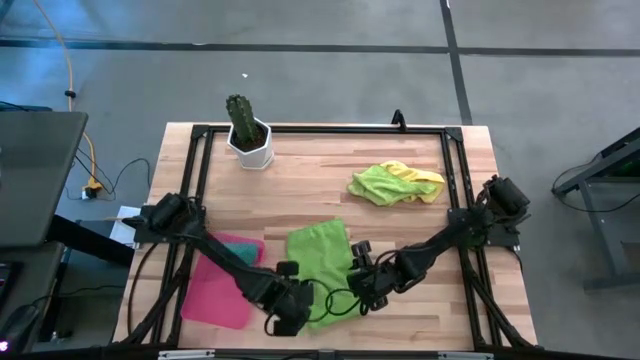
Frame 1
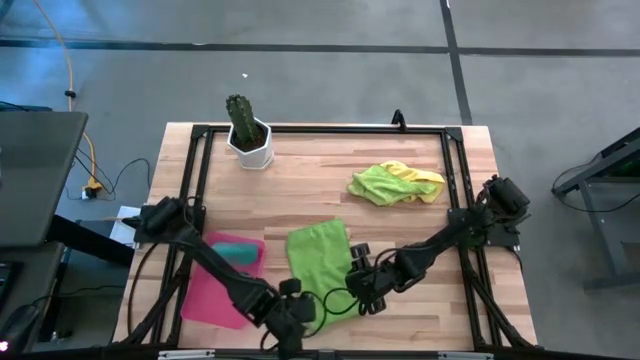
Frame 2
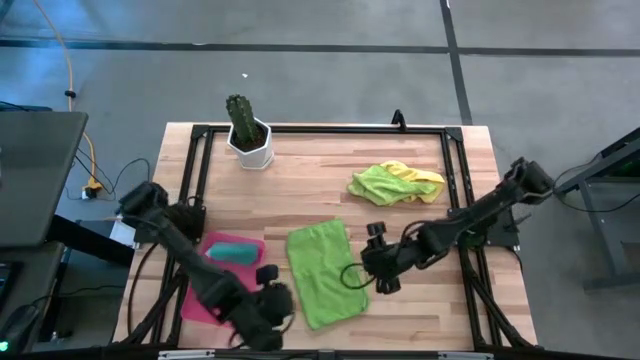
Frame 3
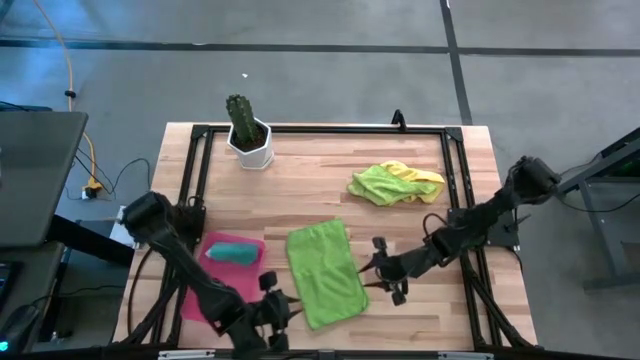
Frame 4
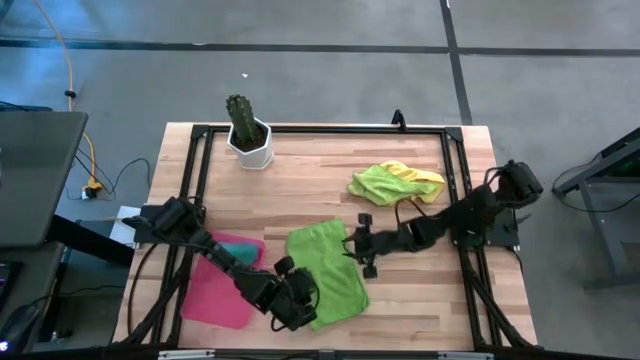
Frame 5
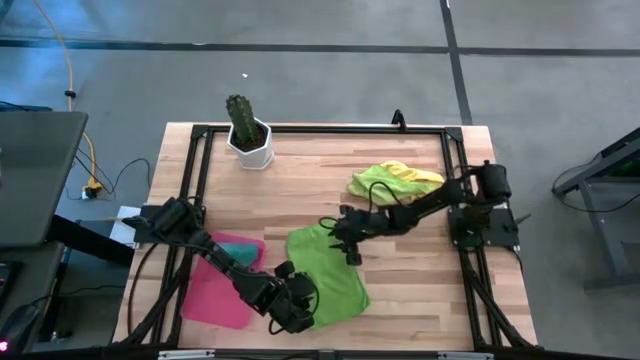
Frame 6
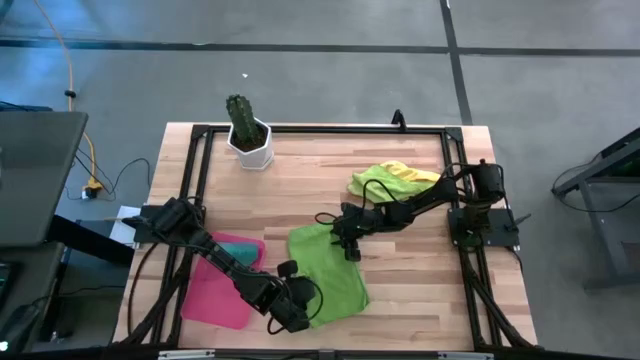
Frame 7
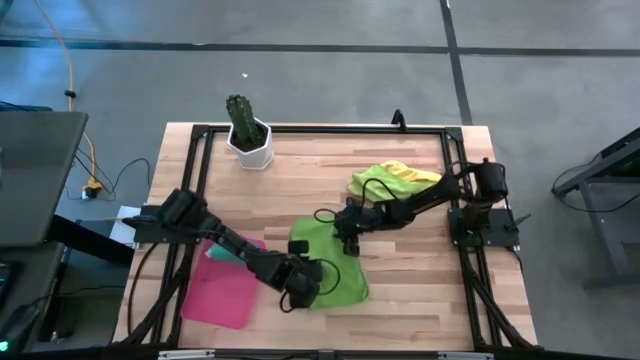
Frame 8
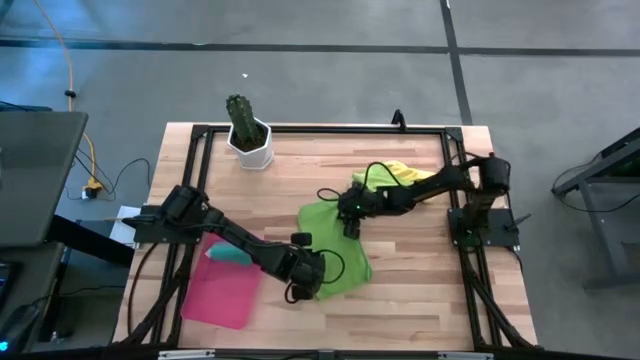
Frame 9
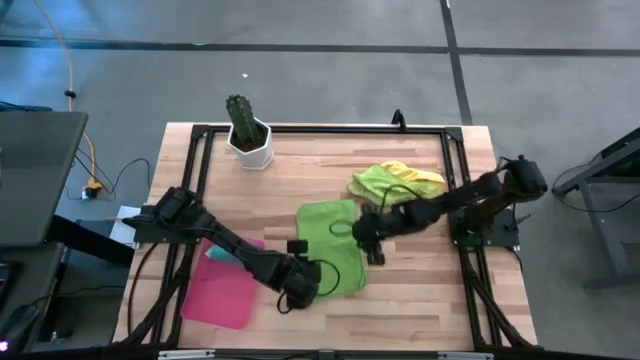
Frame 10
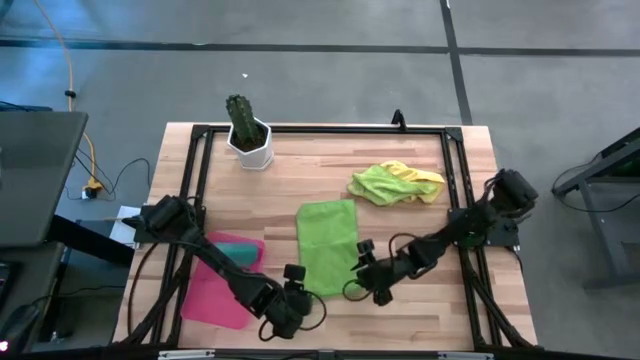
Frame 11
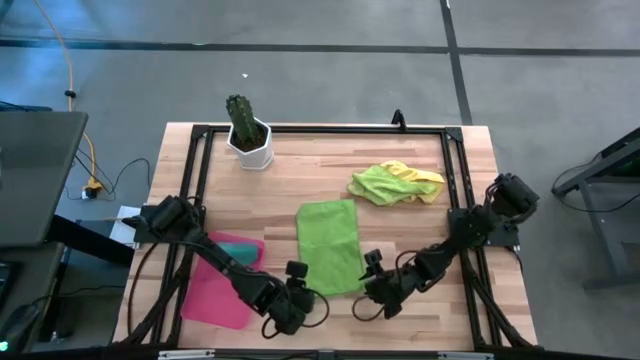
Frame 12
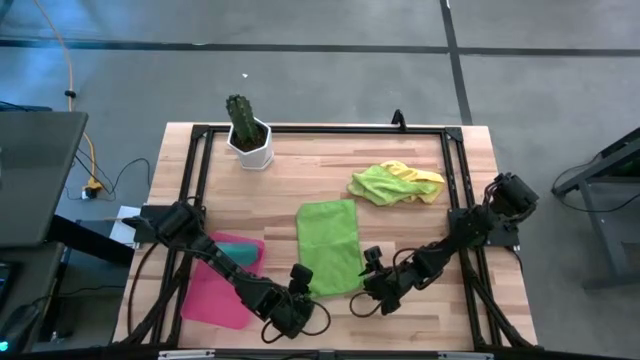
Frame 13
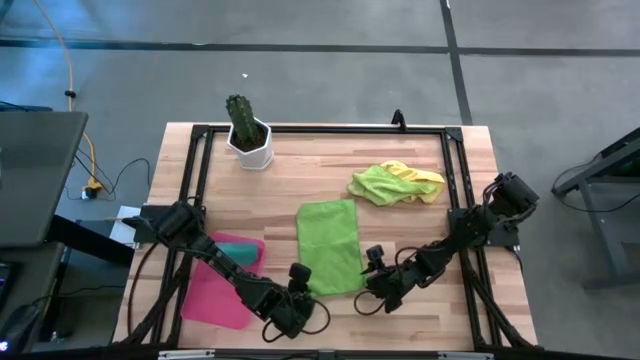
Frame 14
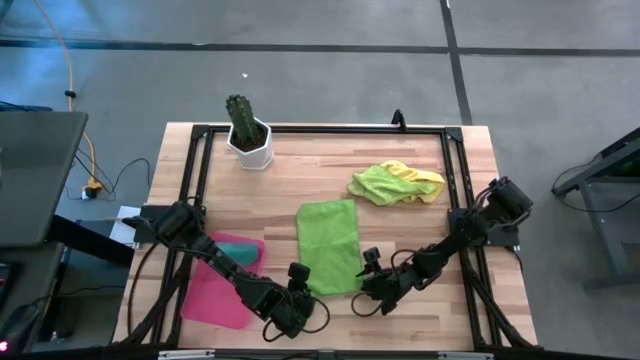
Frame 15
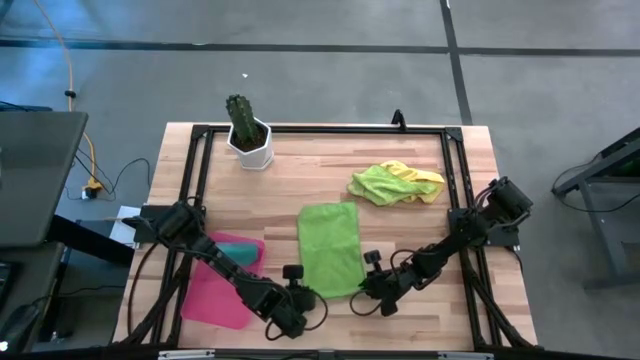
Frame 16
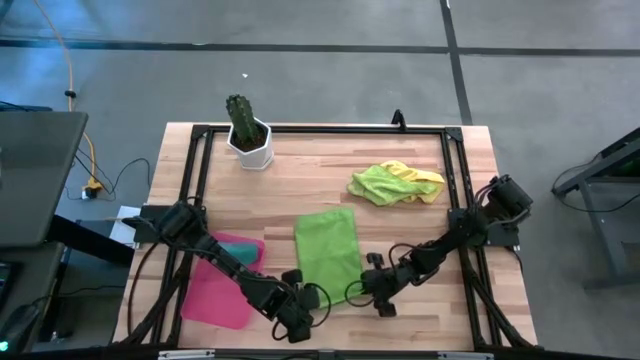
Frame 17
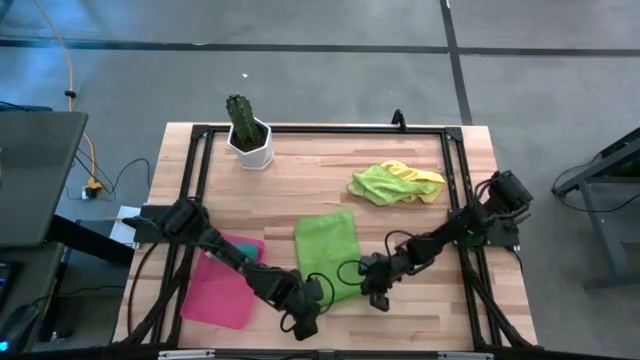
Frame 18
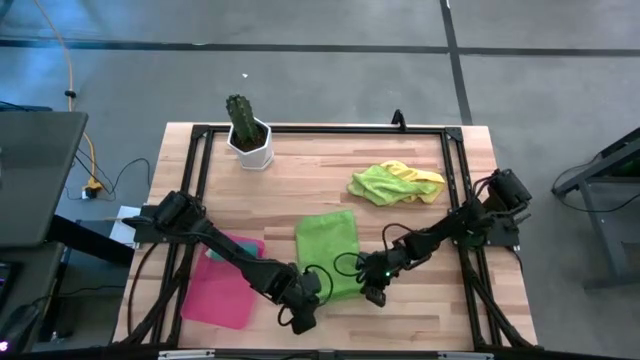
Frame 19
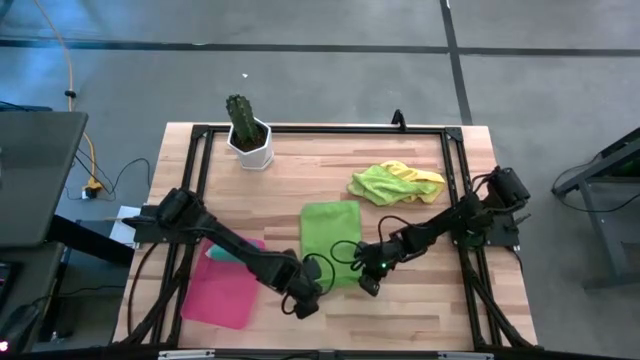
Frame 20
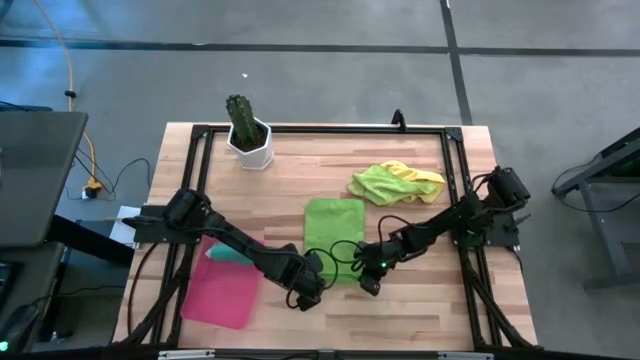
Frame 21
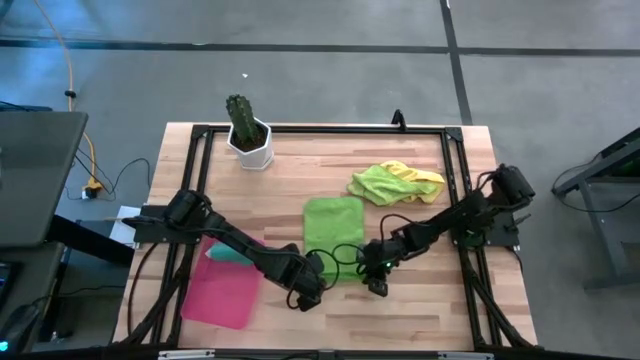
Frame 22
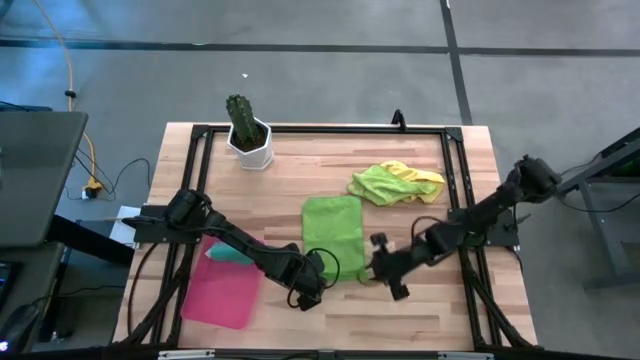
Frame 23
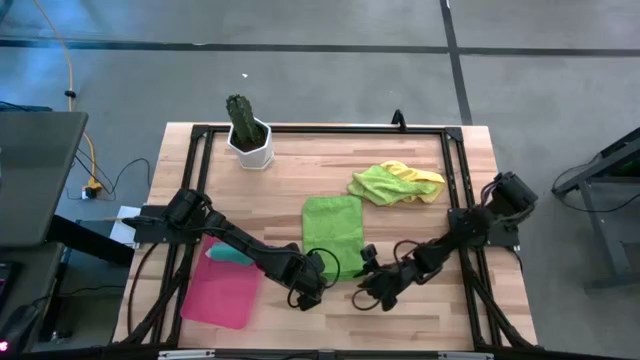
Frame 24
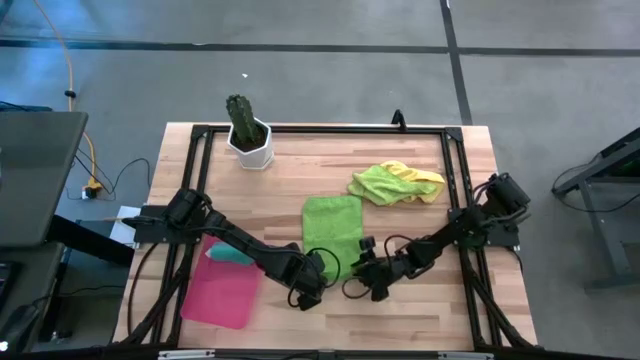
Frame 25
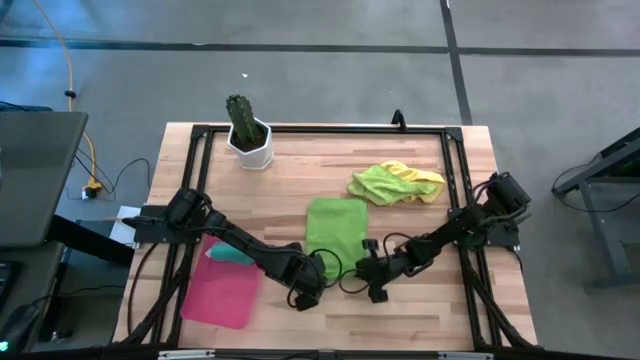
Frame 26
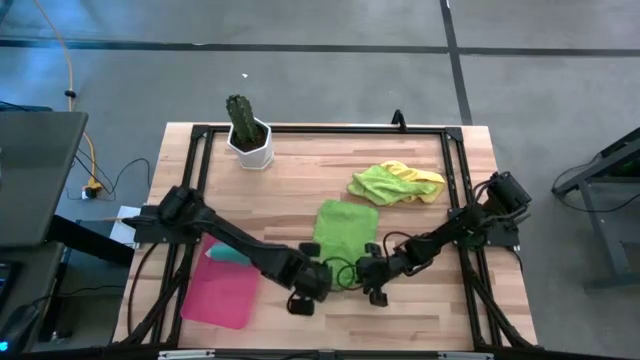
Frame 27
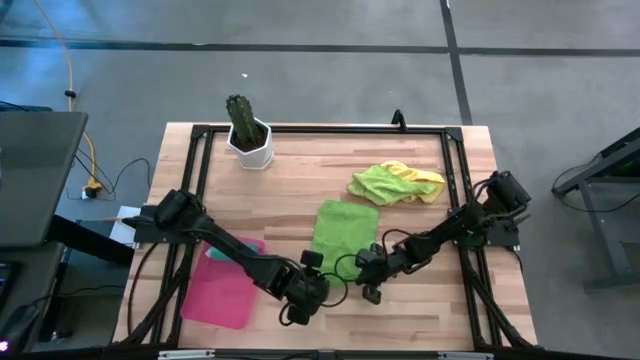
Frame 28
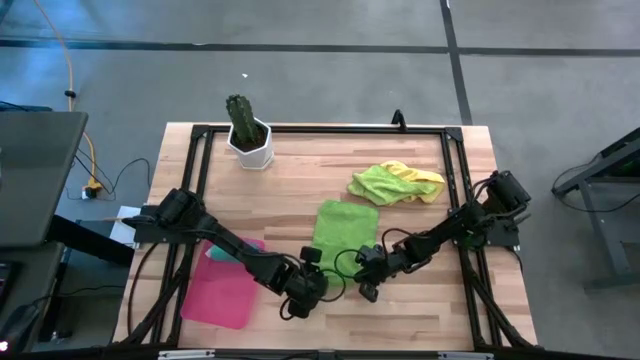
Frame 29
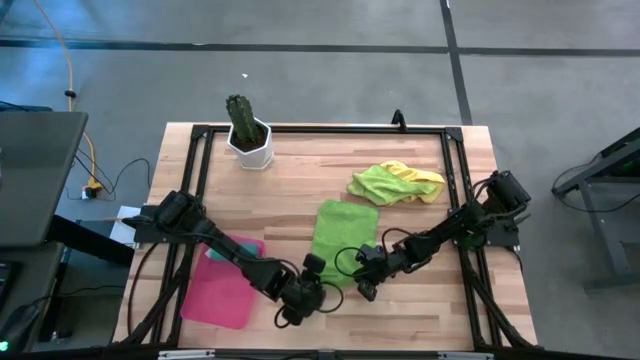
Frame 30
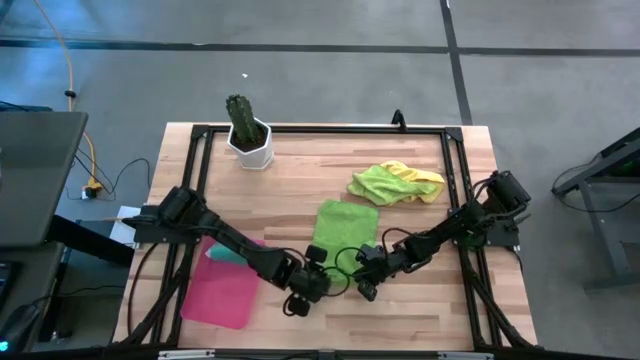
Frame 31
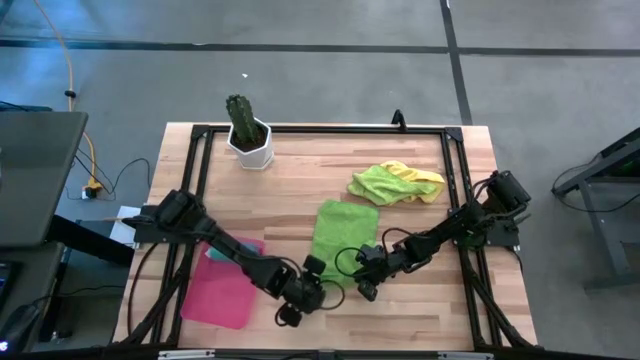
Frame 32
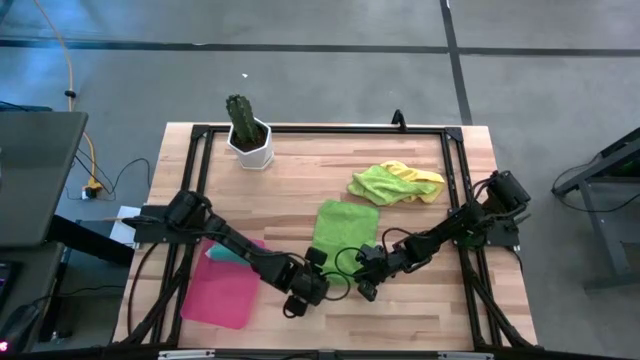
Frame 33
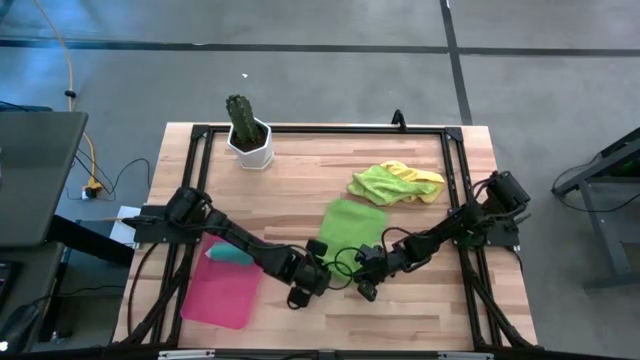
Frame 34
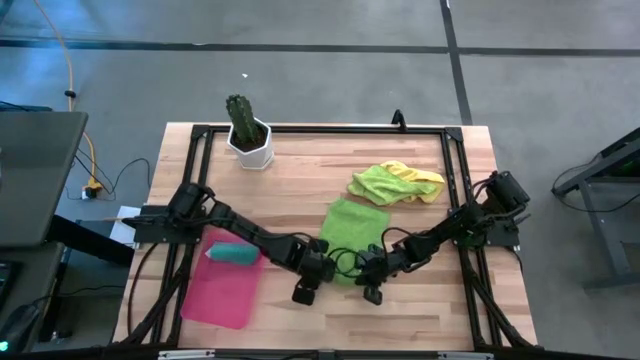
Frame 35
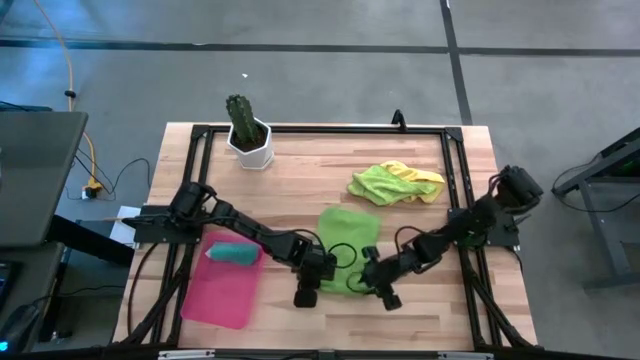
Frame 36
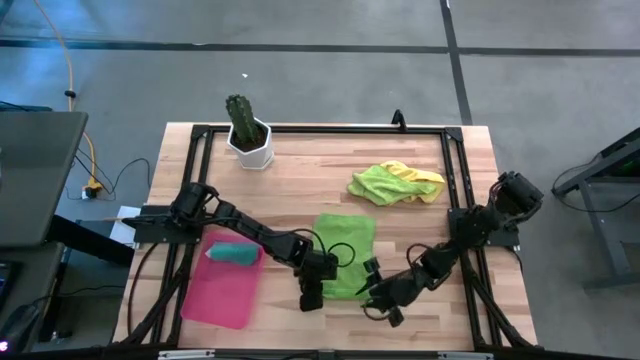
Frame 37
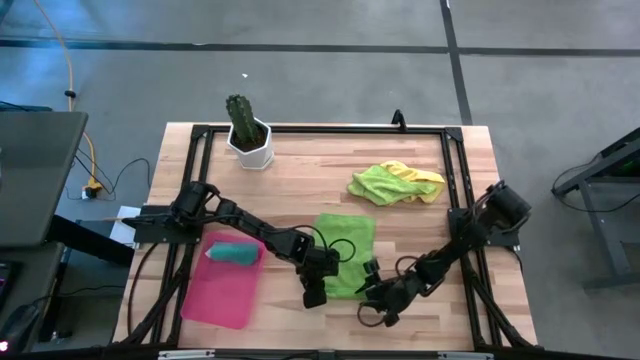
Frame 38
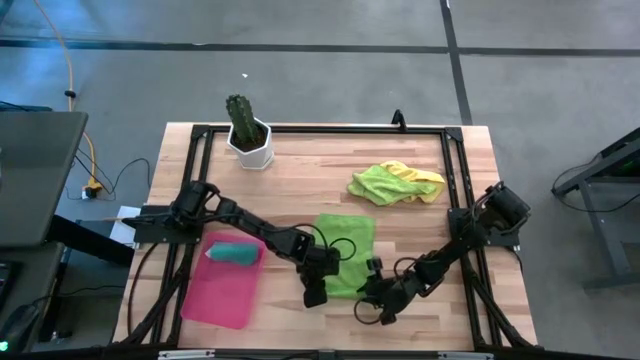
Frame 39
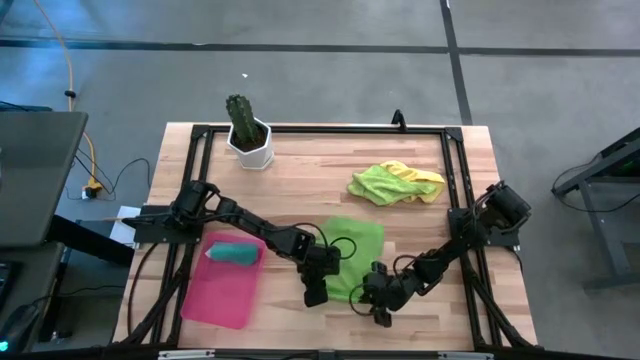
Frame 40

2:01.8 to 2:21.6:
Task: Roll microfiber towels into tight, uniform cylinder then place into a basket
Roll the dark green towel
